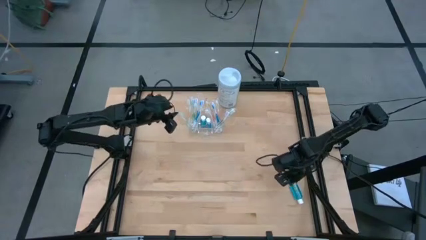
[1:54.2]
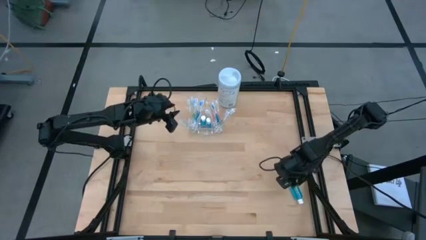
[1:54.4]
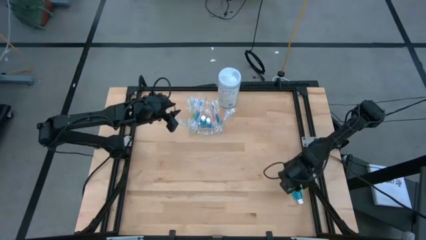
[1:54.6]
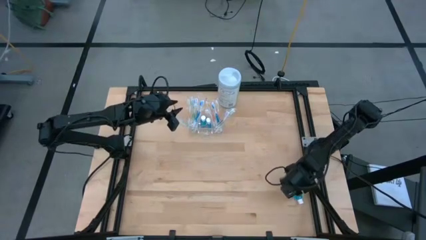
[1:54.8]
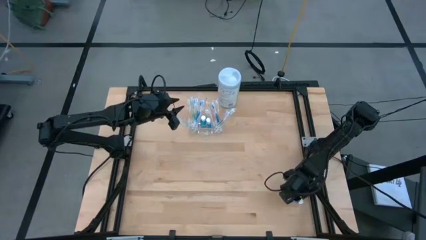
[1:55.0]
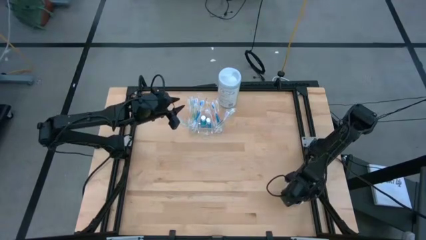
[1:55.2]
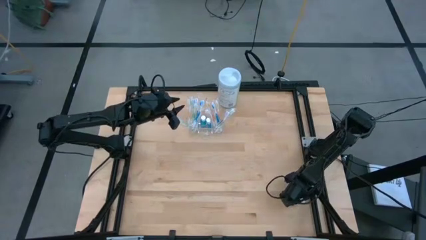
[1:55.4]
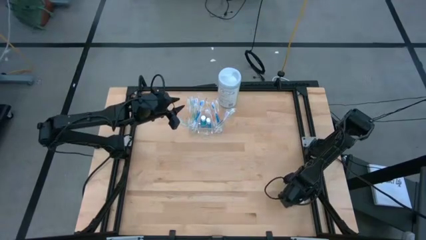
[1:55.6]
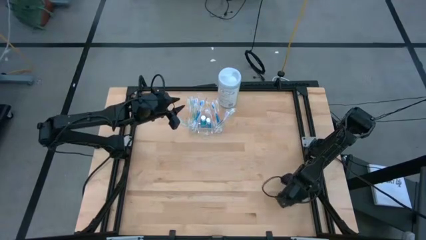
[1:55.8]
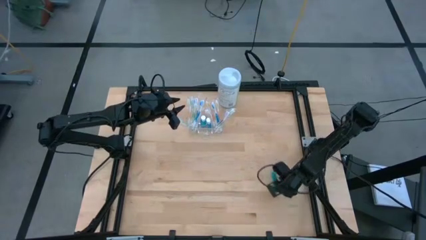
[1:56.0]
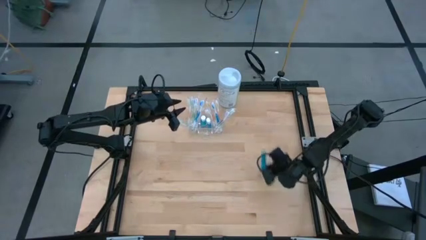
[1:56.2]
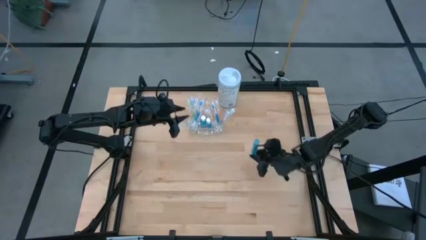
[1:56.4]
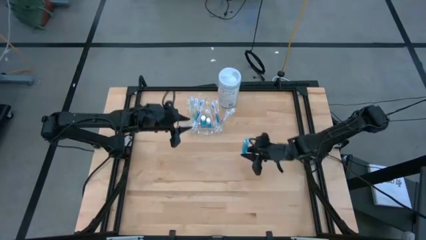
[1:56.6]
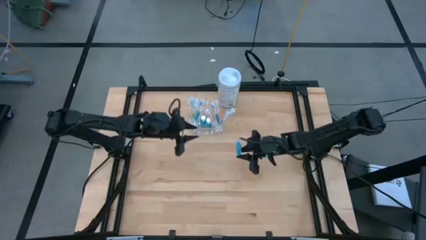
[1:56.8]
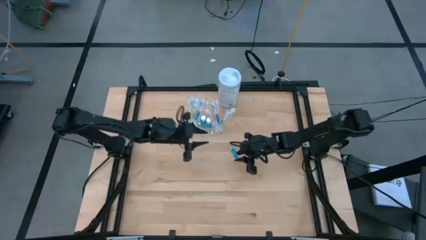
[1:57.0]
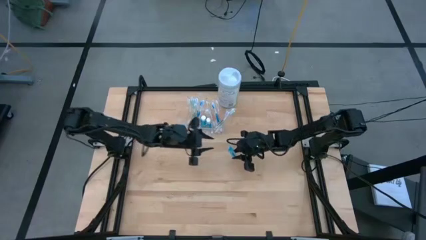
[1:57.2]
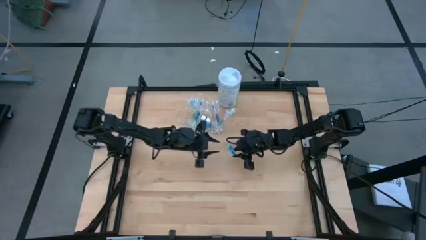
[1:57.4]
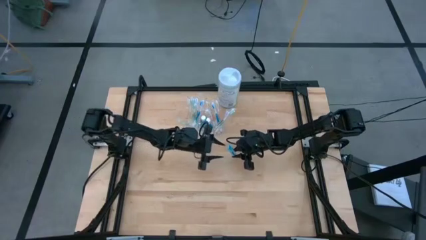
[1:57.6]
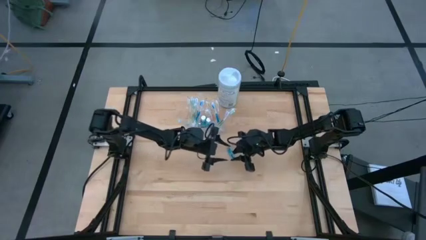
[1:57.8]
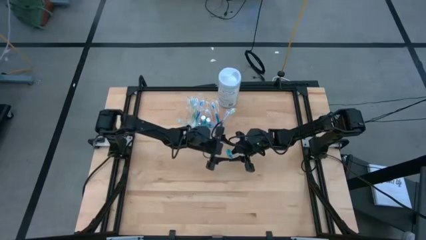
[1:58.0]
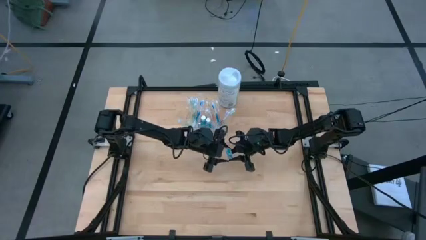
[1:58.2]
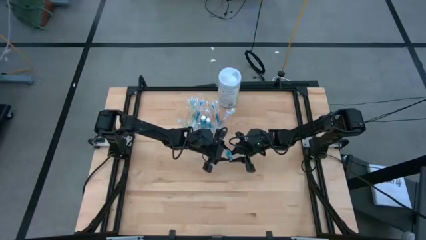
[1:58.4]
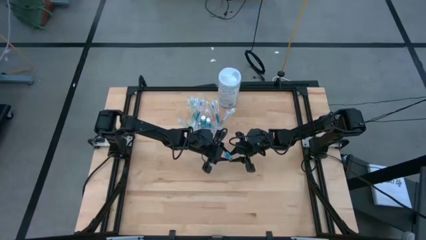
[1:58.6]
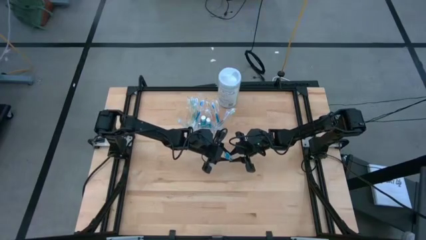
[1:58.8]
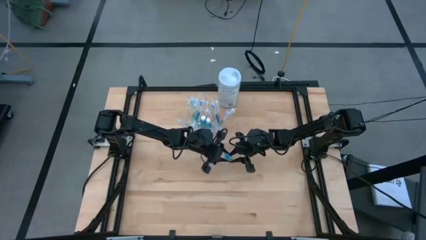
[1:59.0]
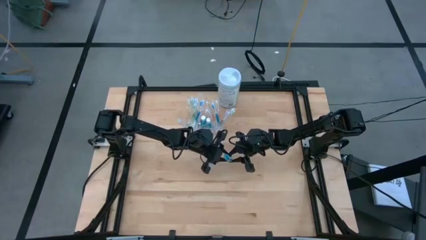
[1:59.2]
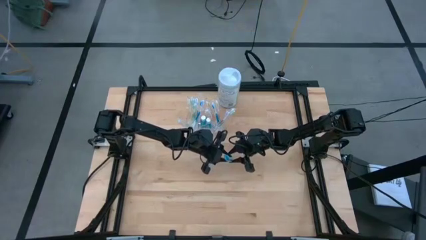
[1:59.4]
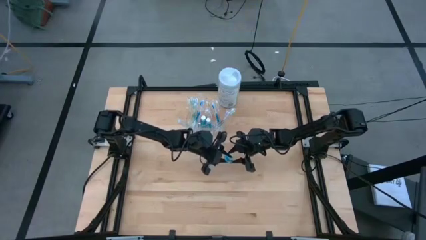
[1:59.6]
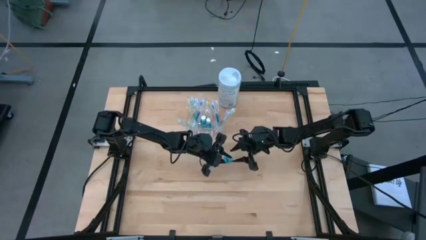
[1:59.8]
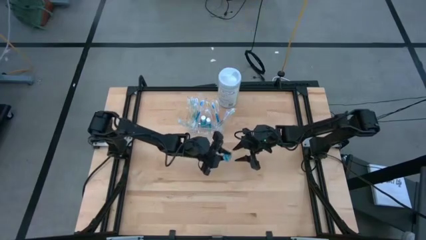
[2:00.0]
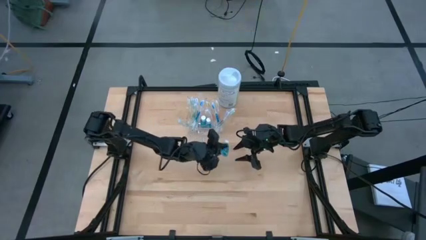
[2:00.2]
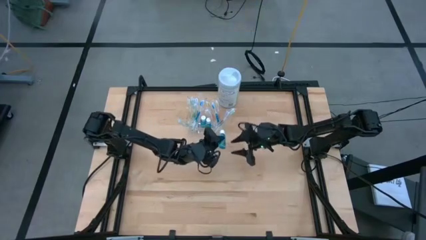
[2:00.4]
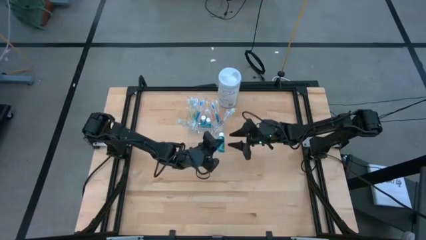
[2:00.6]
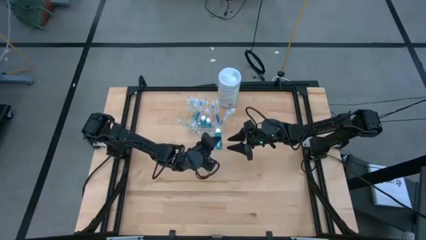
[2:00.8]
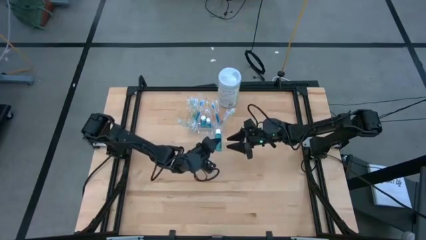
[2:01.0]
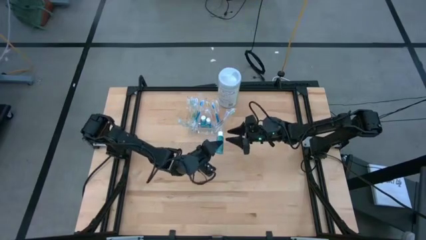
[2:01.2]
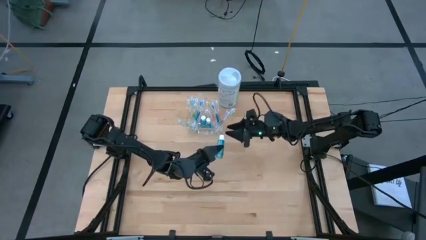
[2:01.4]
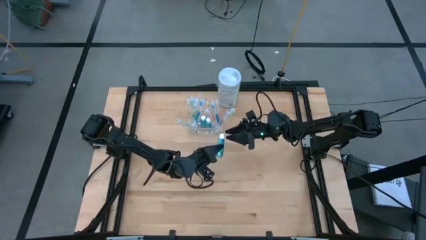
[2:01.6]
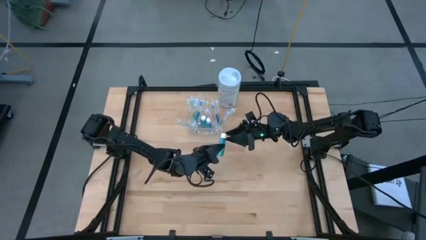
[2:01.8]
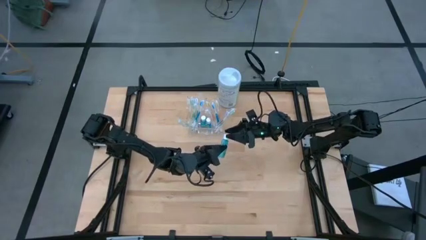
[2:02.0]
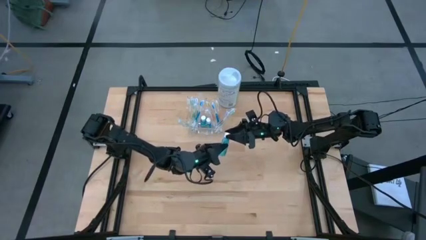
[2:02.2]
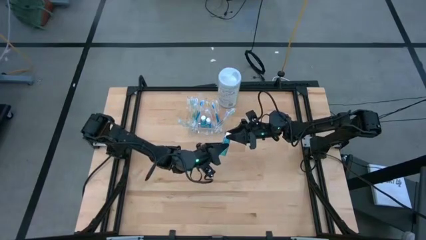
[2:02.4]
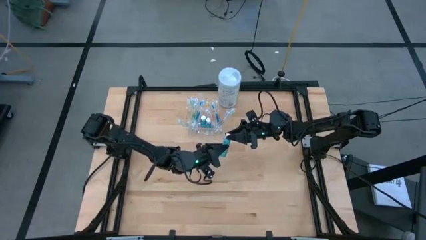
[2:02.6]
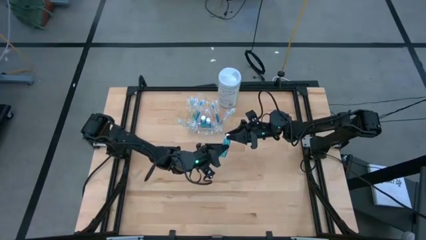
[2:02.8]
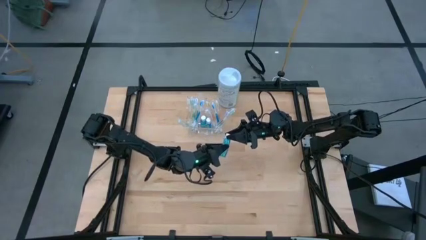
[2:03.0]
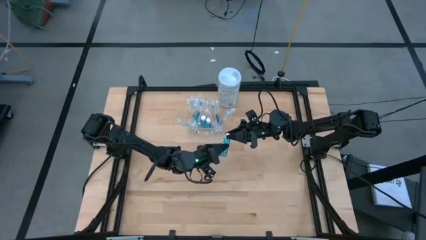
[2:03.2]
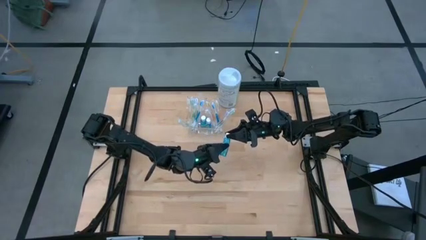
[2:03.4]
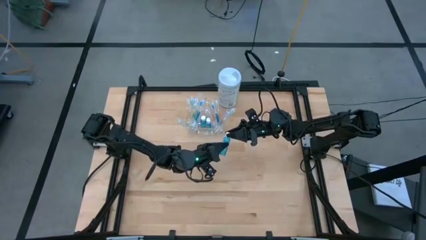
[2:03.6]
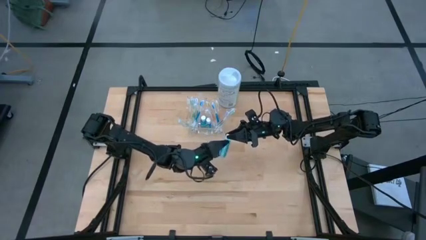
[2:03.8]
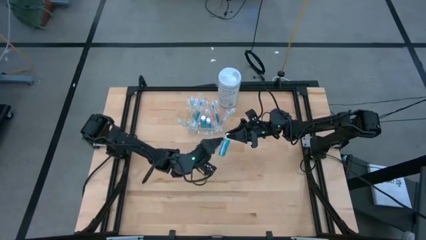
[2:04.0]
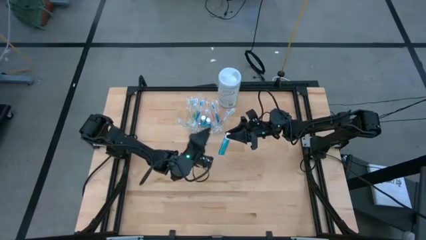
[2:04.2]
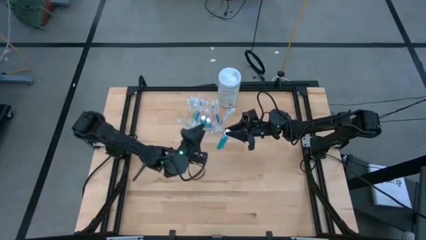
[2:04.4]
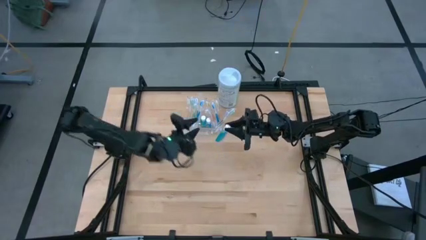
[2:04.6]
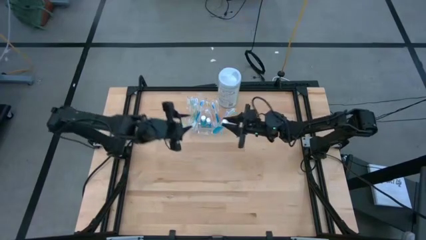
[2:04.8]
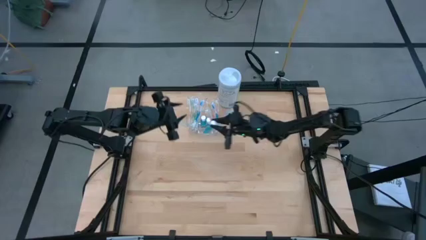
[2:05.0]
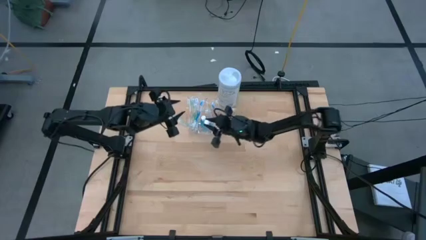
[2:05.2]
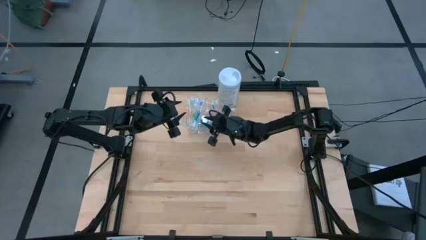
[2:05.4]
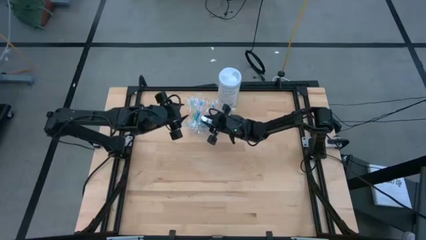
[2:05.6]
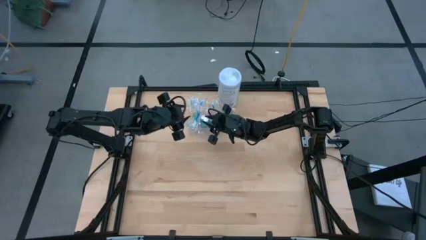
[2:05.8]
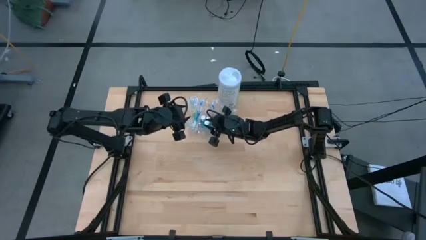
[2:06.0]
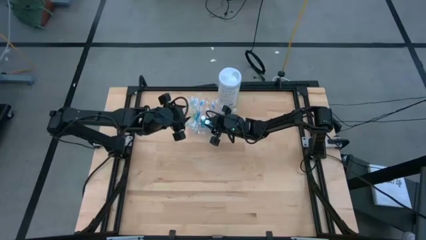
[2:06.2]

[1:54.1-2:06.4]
Task: Pick & Place toothbrushing station
Put the blue mouthwash into the transparent organizer

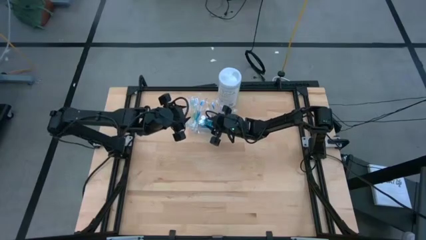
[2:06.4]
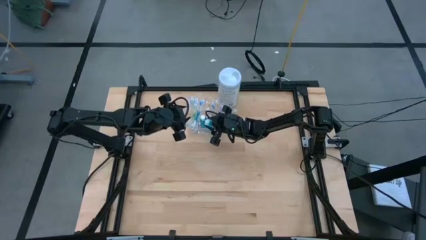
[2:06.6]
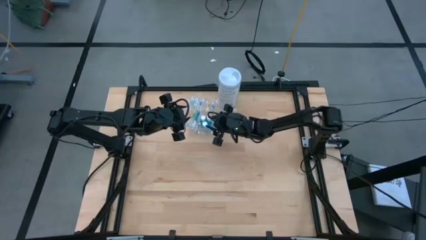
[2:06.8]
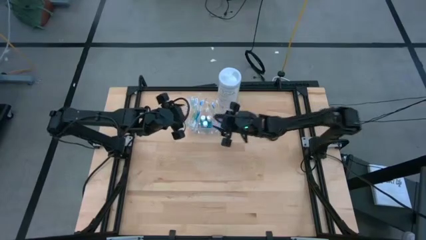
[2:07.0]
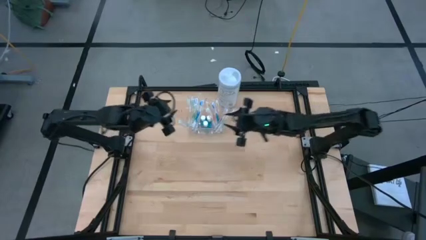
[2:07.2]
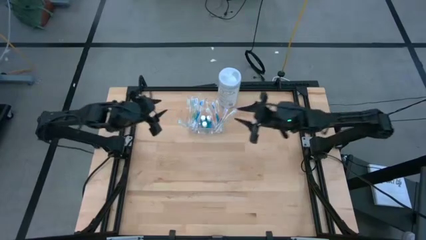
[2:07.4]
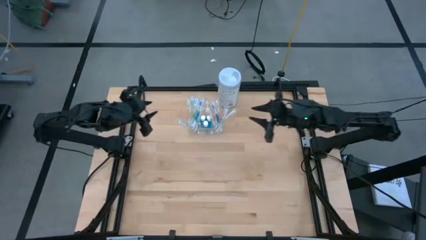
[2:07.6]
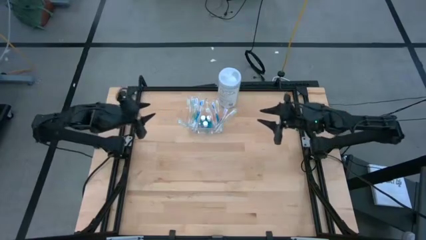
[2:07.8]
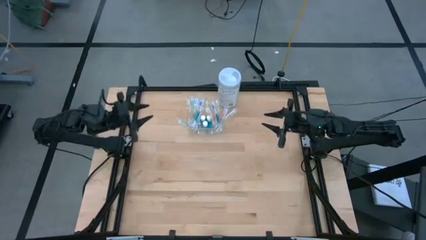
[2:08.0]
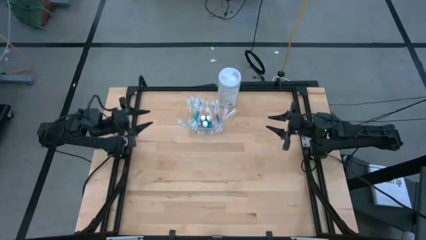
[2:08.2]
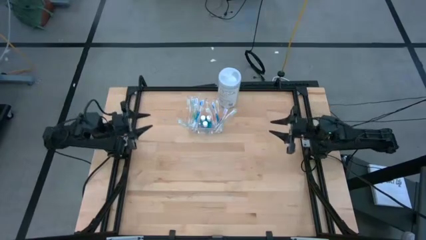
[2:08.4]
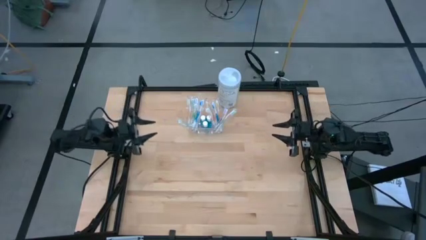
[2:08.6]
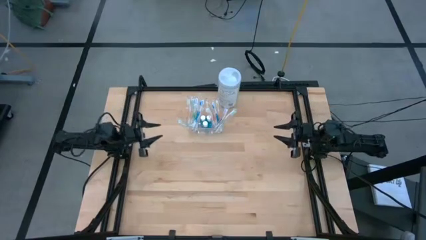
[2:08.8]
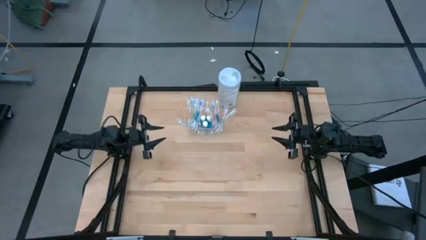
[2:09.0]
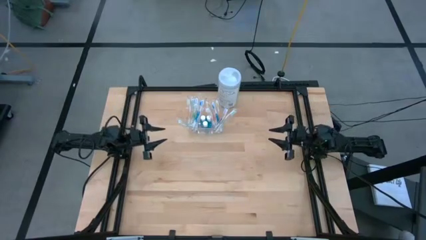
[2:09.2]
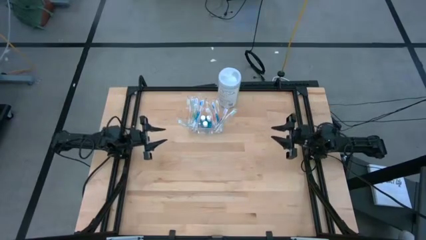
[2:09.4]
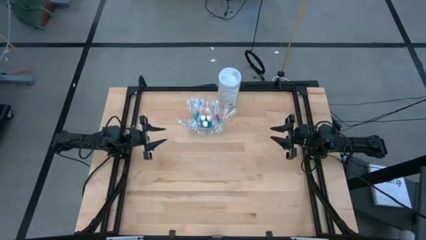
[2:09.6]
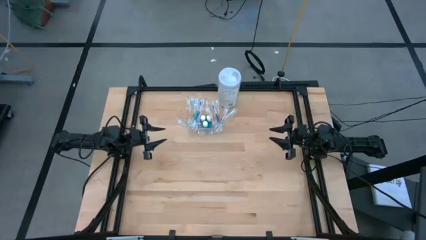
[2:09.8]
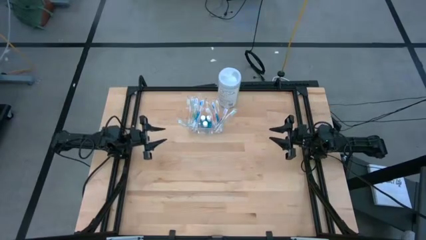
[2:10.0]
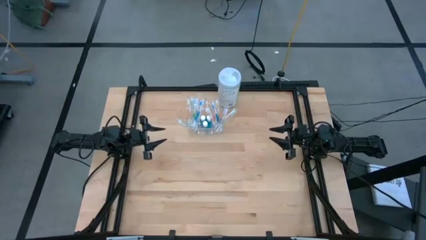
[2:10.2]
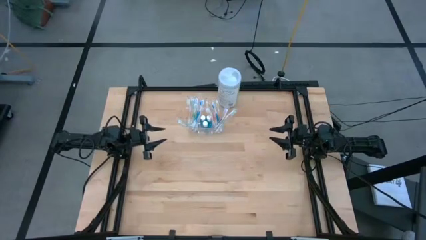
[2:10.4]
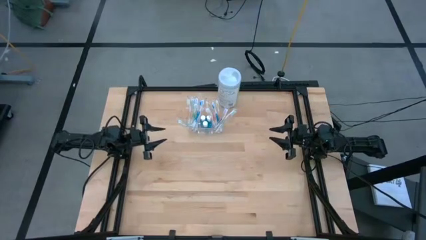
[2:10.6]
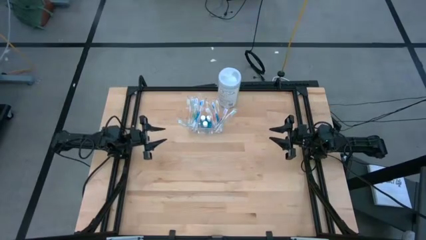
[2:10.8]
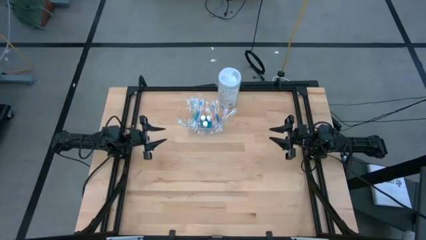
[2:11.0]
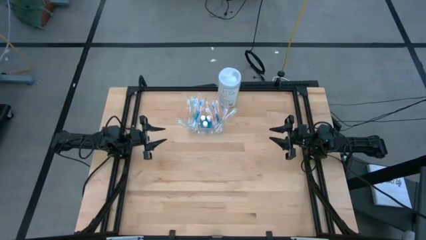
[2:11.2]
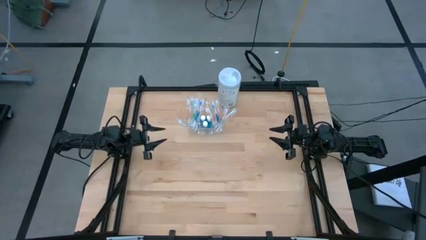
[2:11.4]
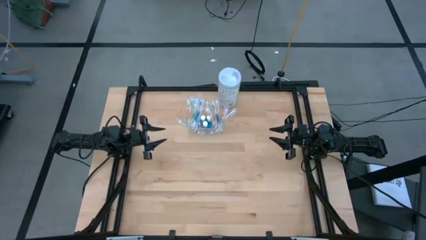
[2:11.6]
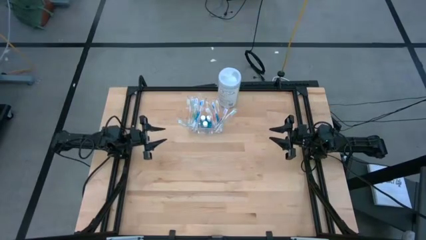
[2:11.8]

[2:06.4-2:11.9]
Return to Home Position
